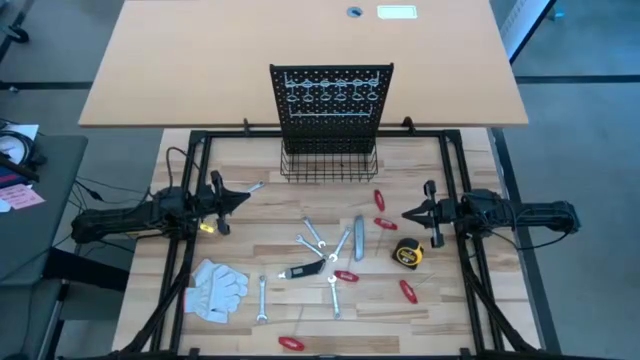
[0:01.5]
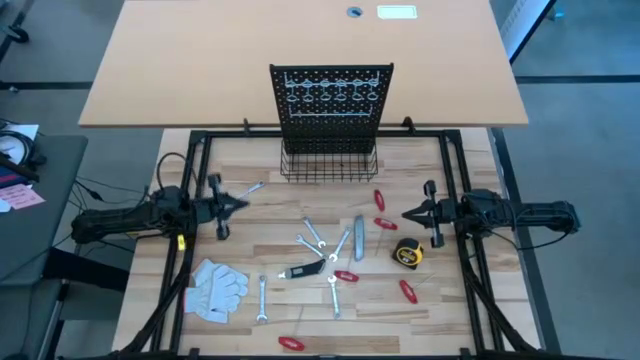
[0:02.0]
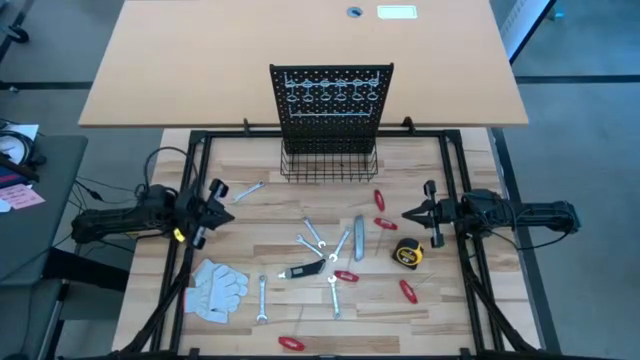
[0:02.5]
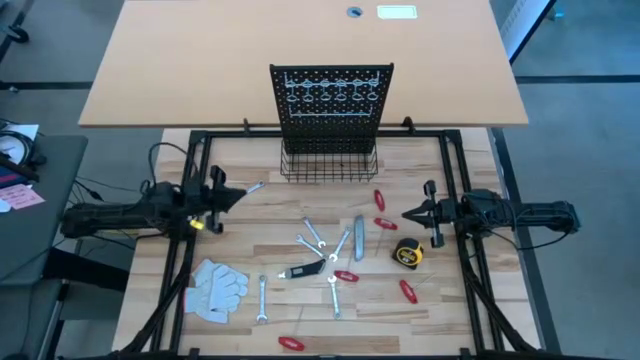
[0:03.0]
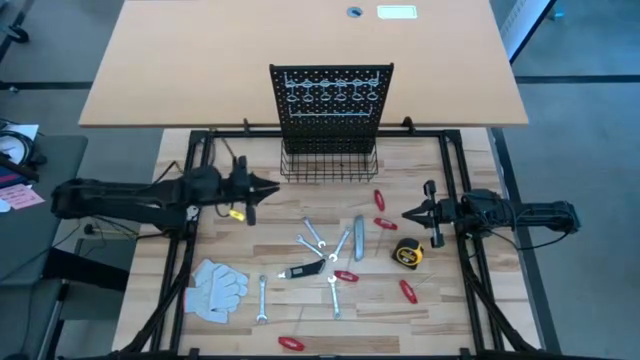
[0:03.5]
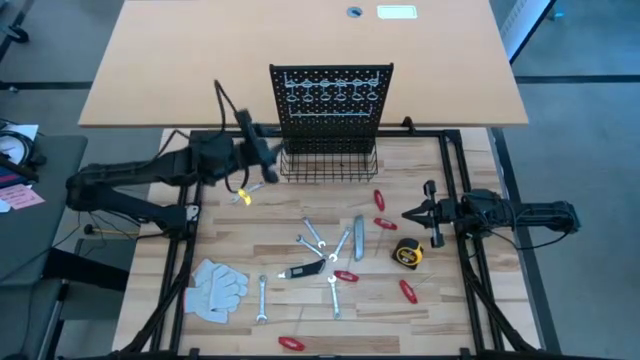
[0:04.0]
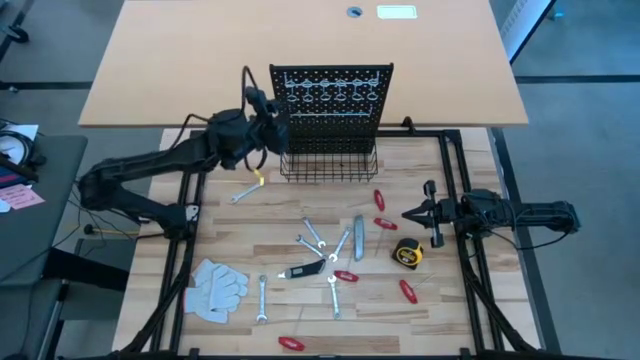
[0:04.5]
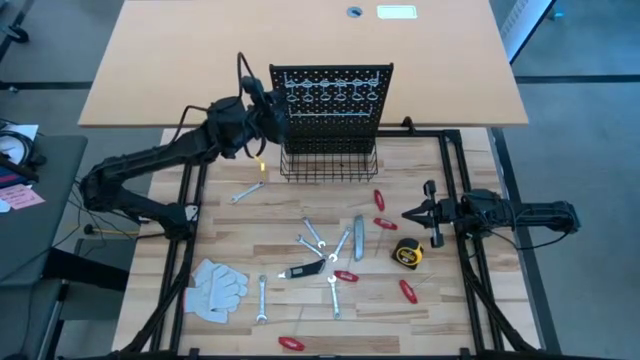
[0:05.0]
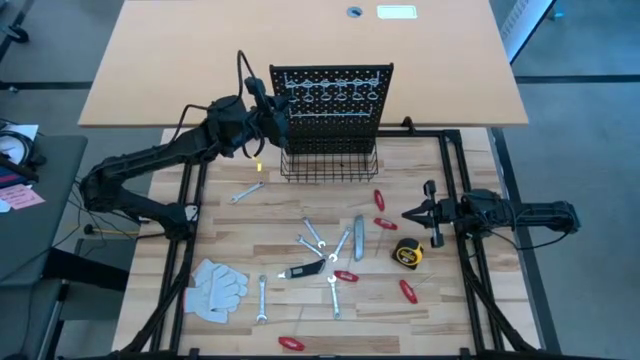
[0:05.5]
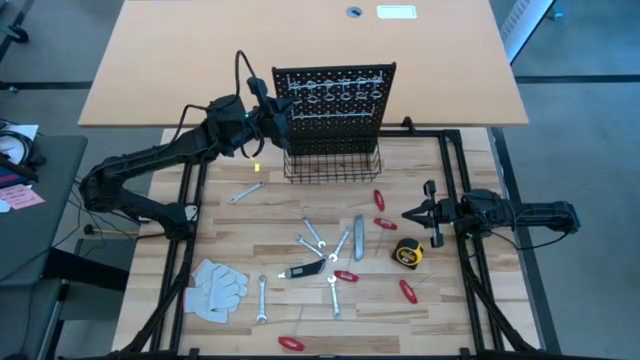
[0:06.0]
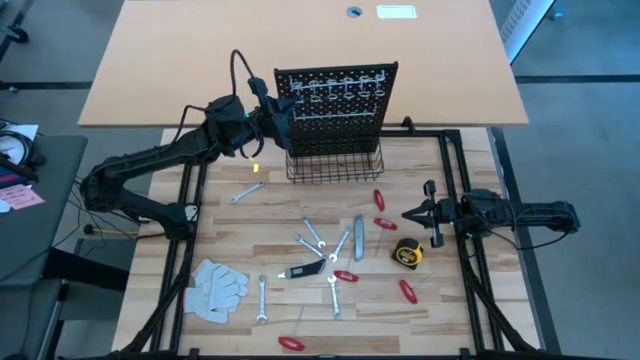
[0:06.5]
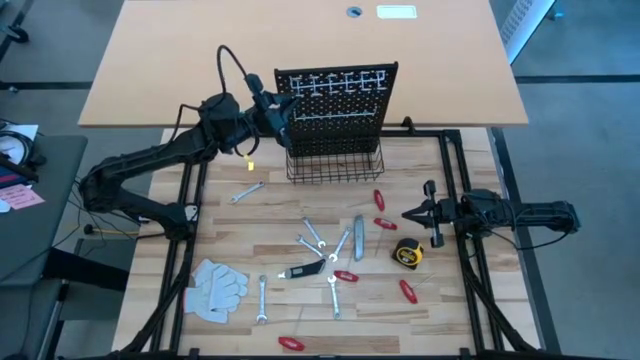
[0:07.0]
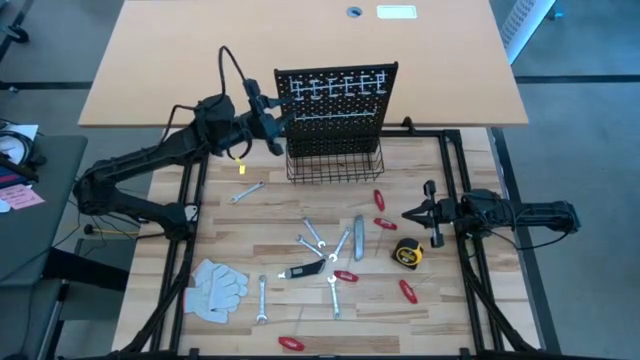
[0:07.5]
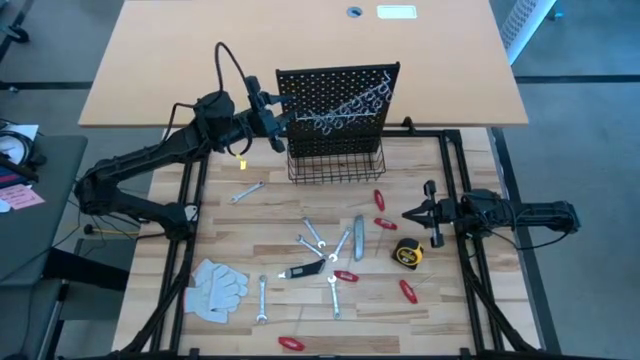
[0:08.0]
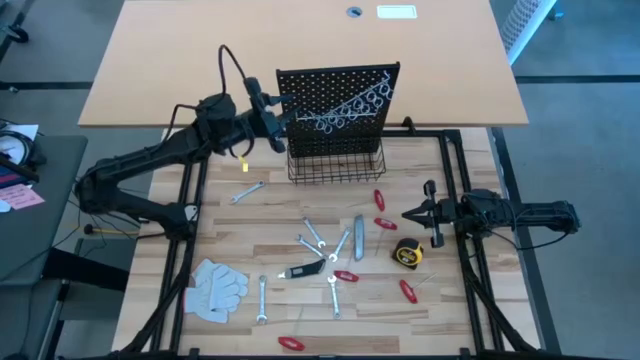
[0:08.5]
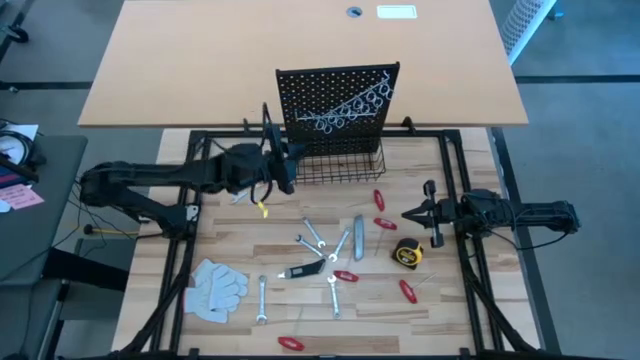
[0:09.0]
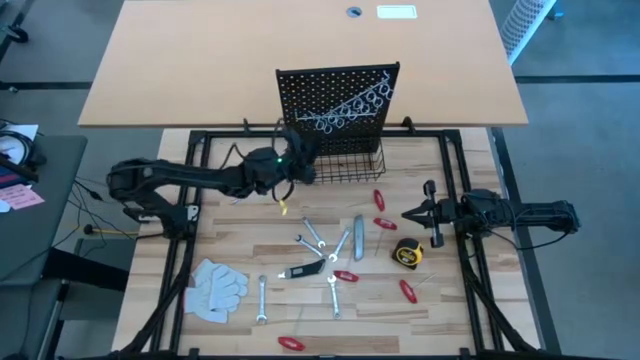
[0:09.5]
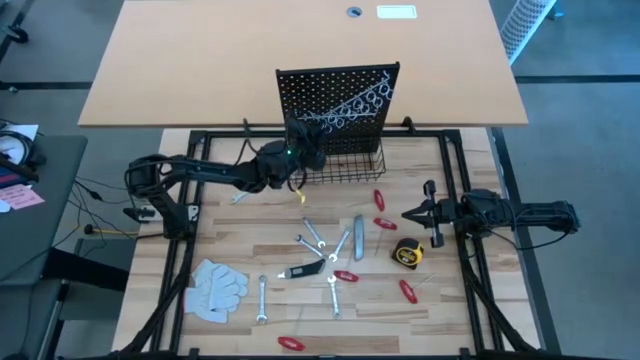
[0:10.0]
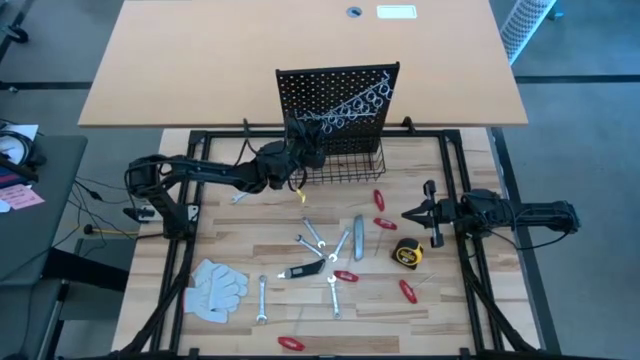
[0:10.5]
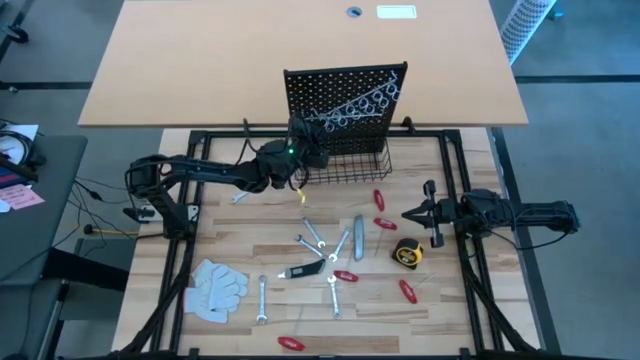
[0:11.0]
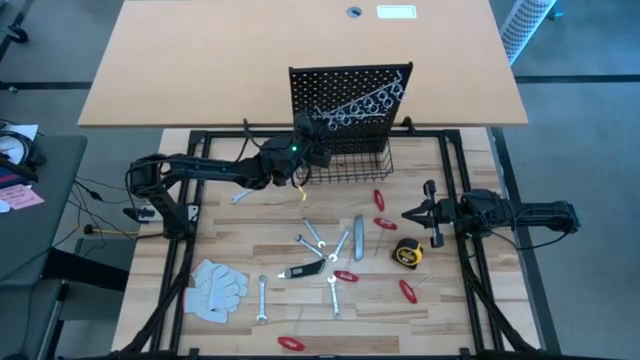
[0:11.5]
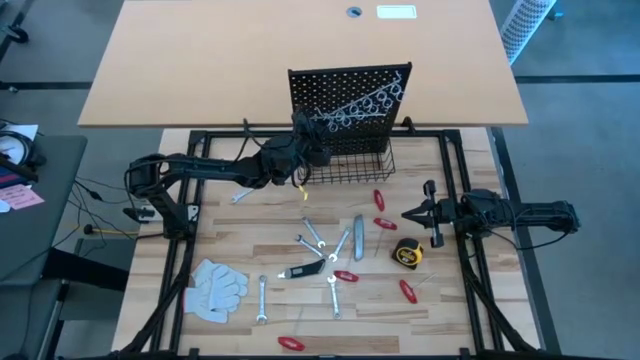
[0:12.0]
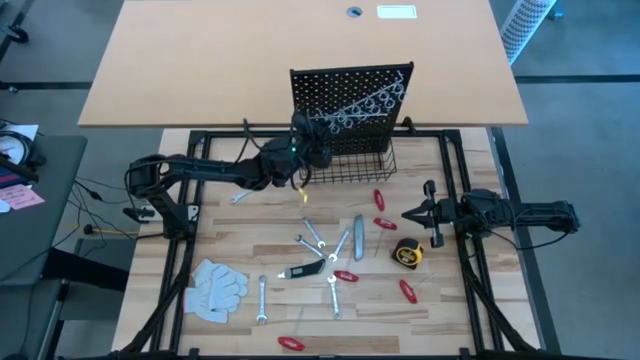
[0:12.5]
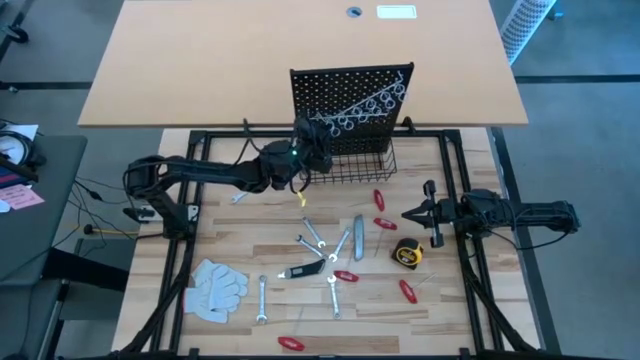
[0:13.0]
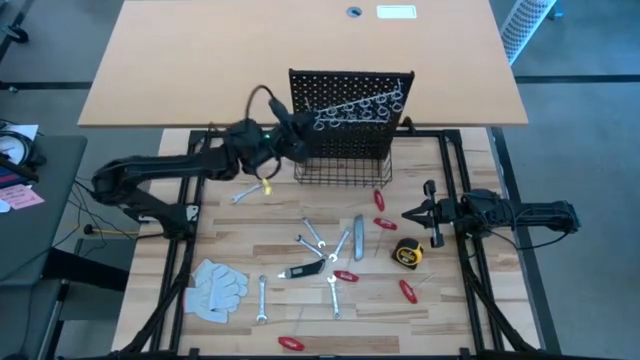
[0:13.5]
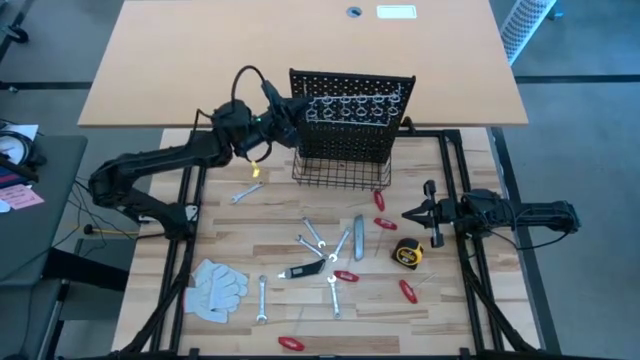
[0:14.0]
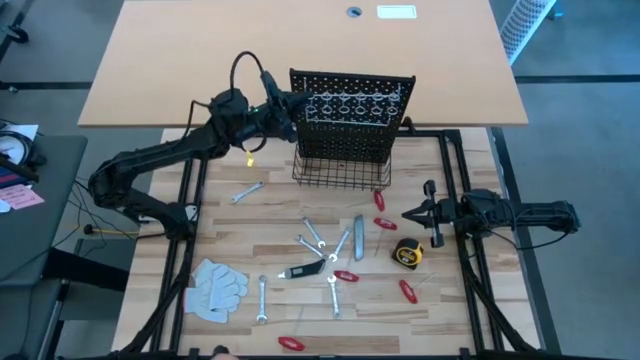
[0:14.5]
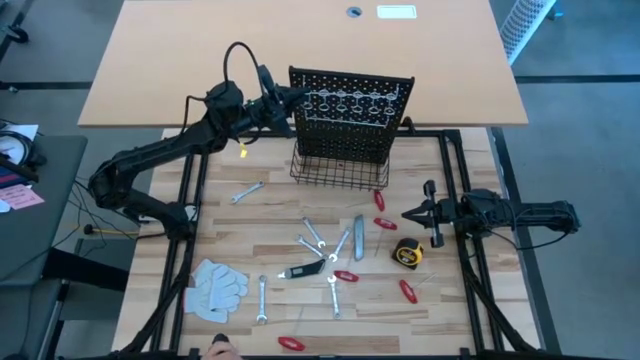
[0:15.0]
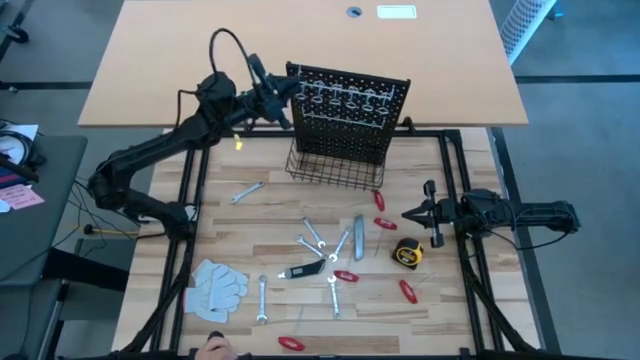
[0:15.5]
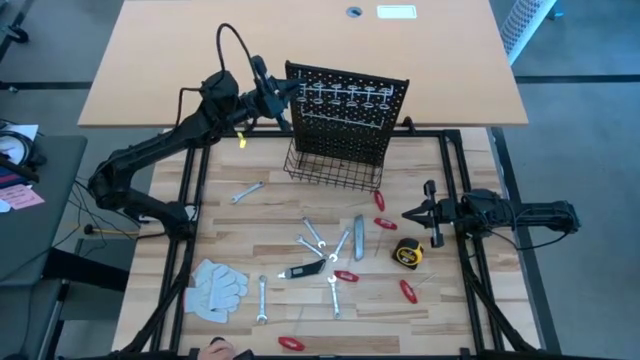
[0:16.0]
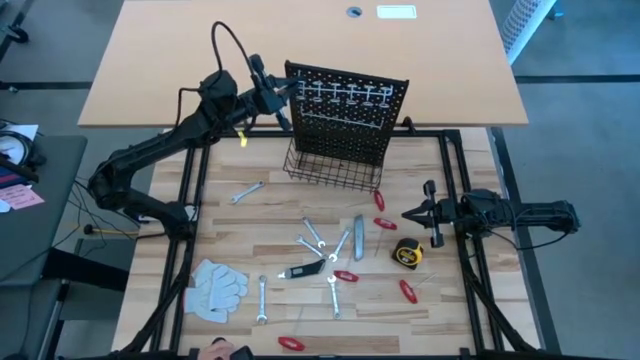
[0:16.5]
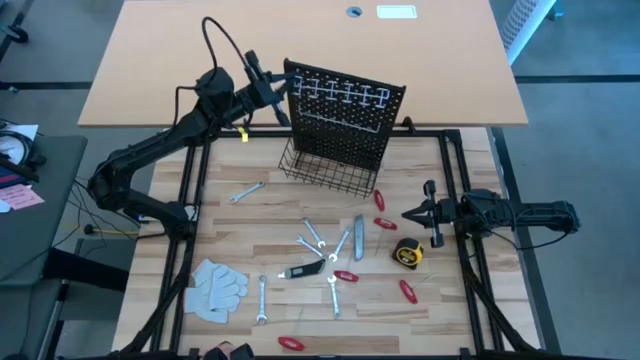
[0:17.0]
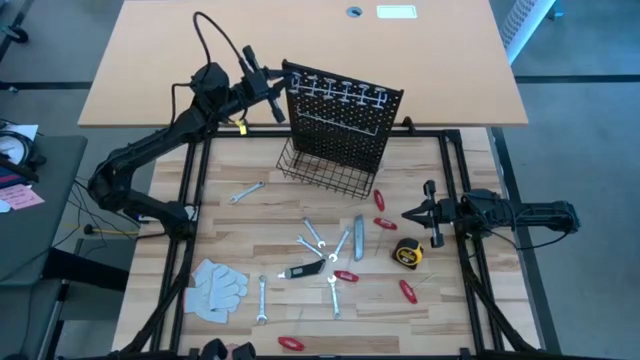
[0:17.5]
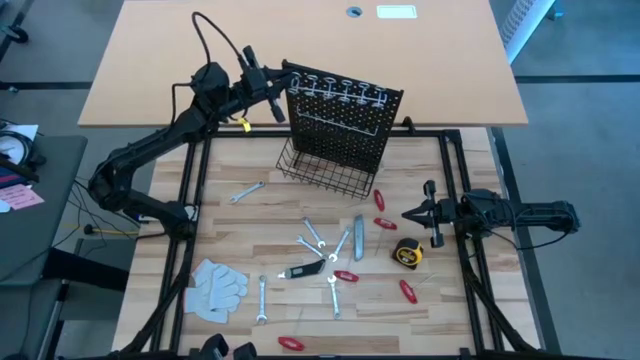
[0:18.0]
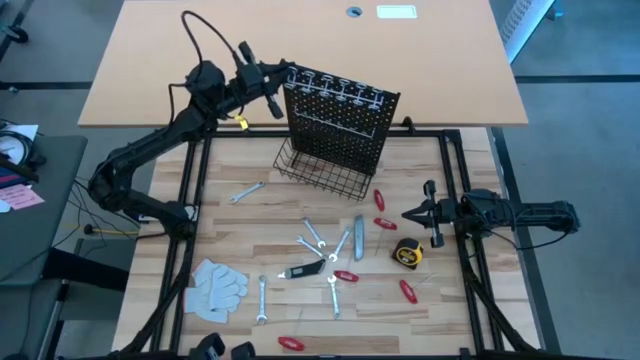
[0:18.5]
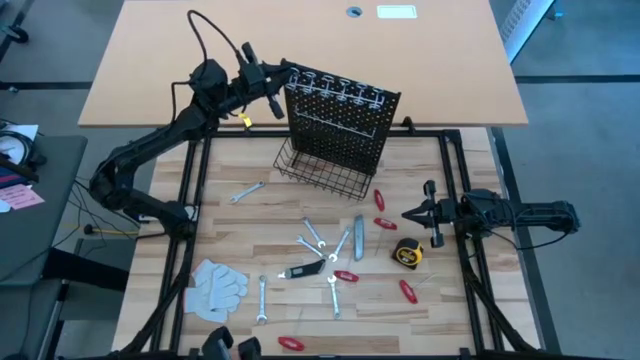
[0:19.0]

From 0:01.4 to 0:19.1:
Task: Hang tools onto peg board
Hang the hook on the pegboard

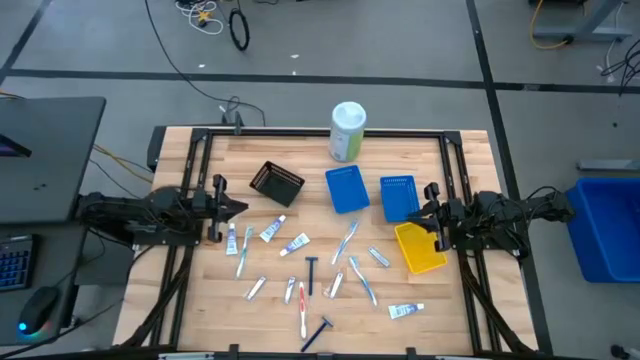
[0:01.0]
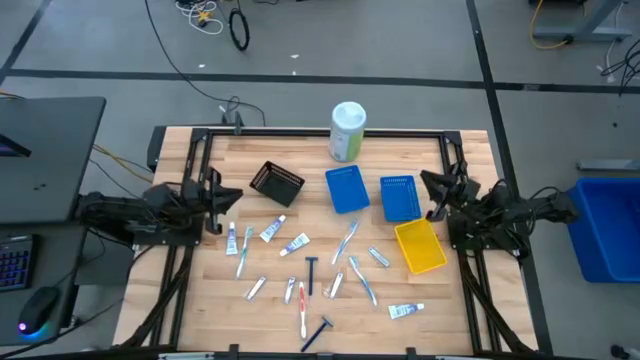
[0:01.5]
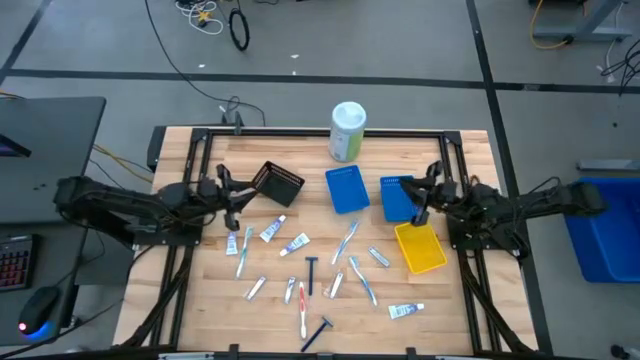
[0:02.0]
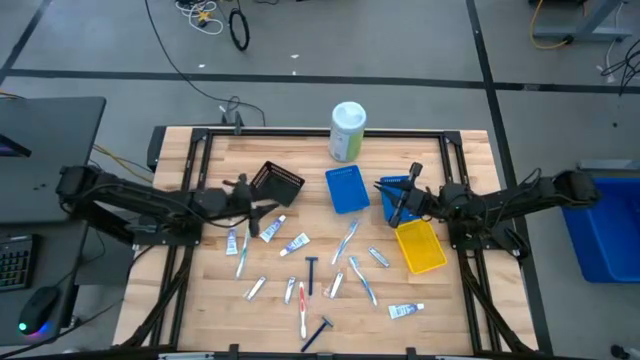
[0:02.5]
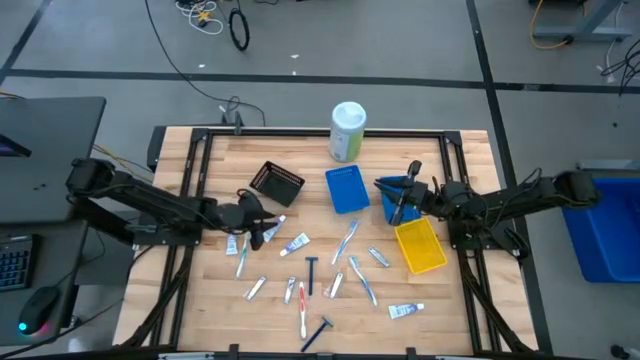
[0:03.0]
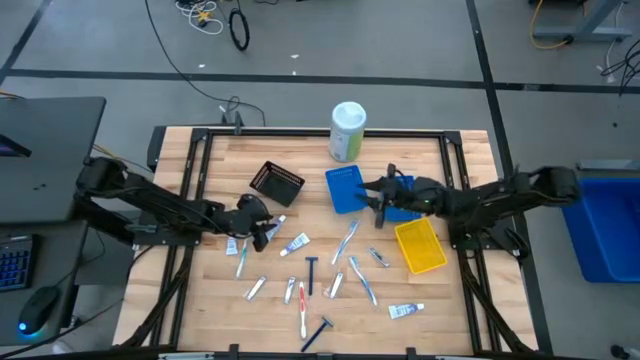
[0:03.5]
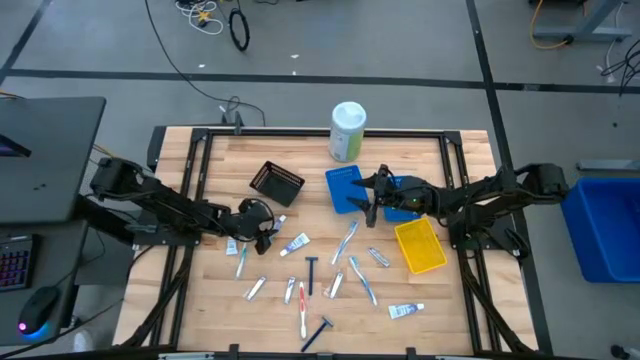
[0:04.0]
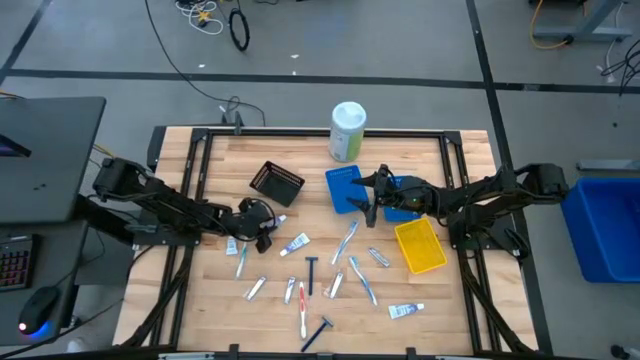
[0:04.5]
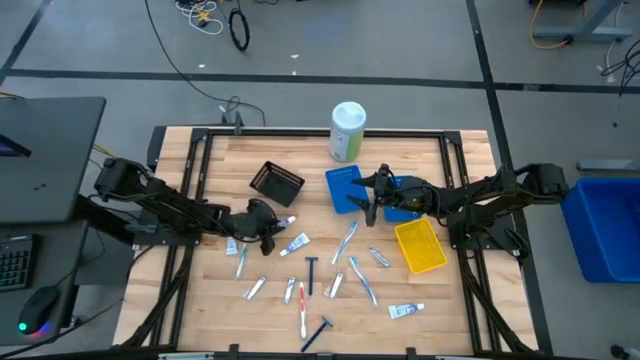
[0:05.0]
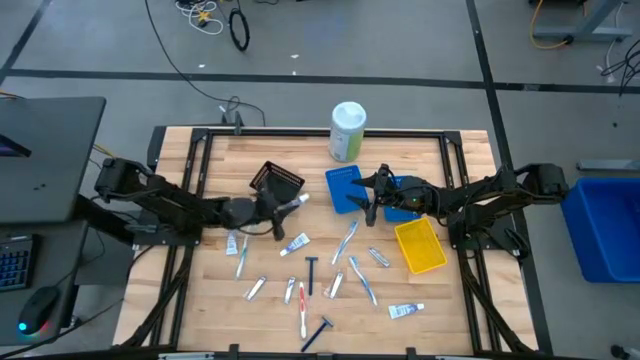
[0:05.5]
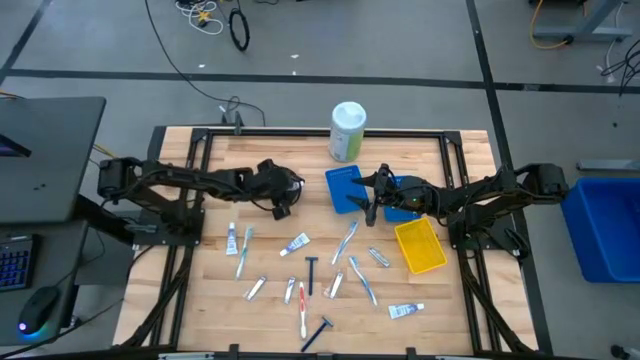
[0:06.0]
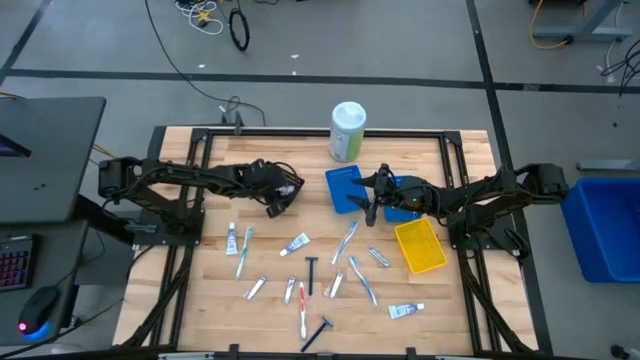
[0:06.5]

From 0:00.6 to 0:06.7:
Task: Pick & Place Travel size toiletries
Put the toothpaste into the black basket
